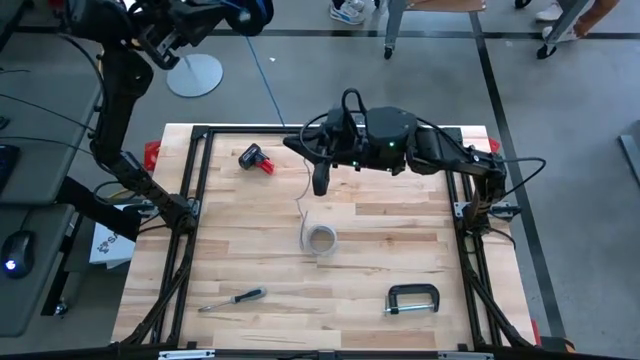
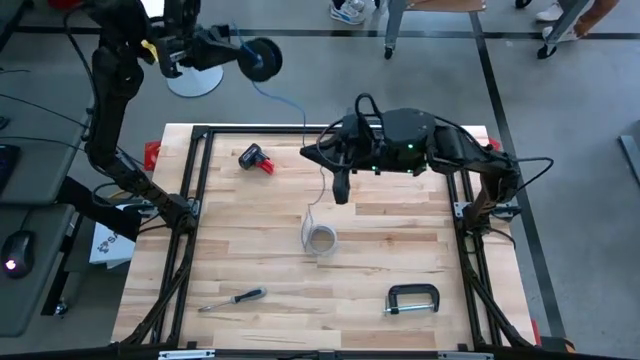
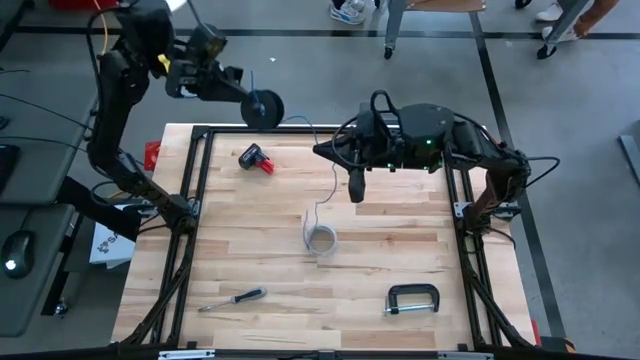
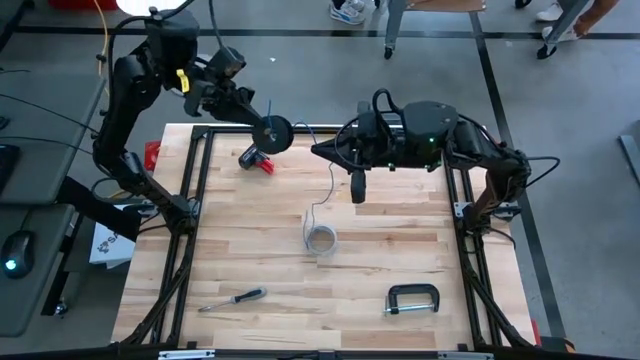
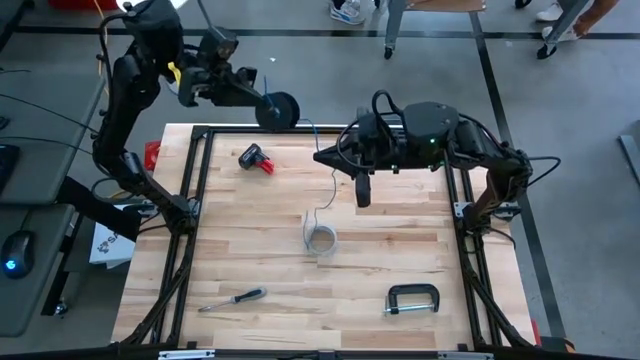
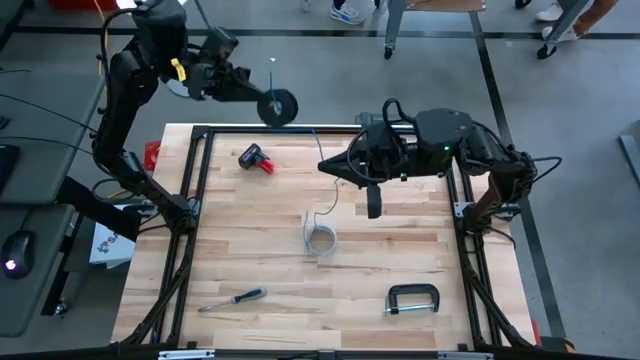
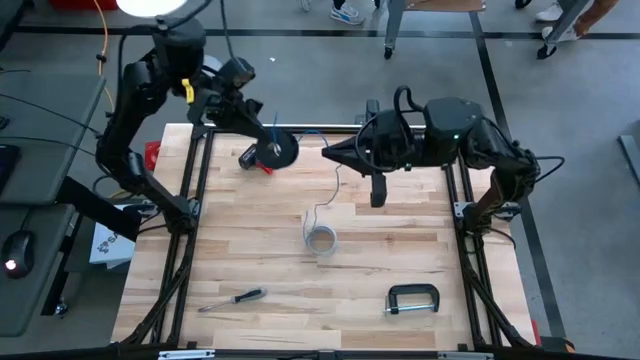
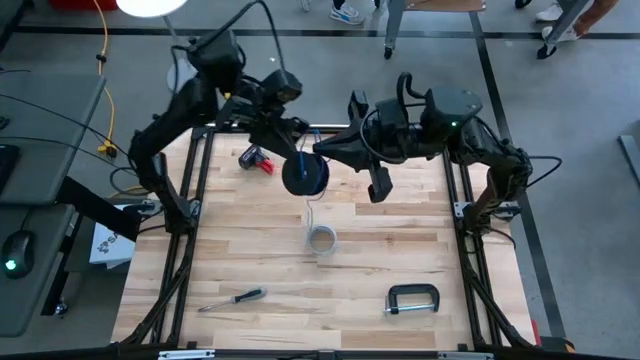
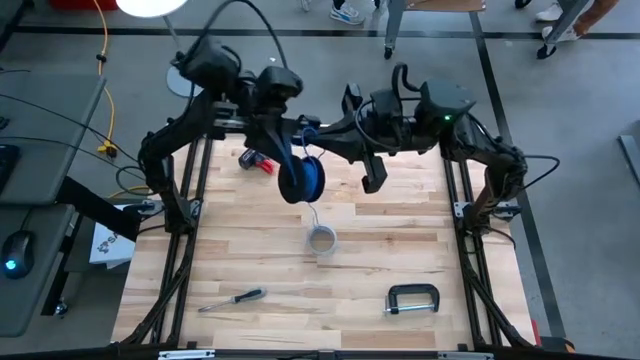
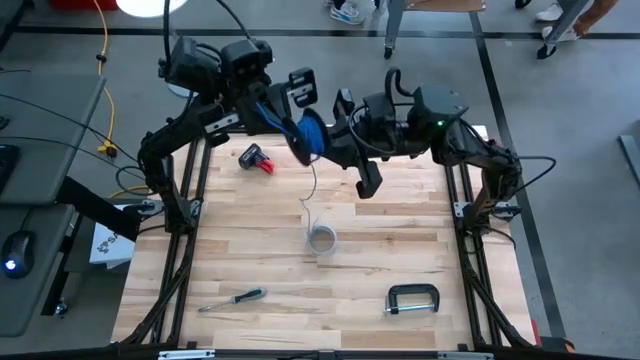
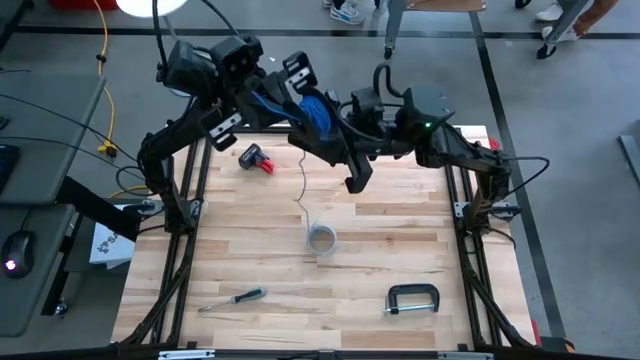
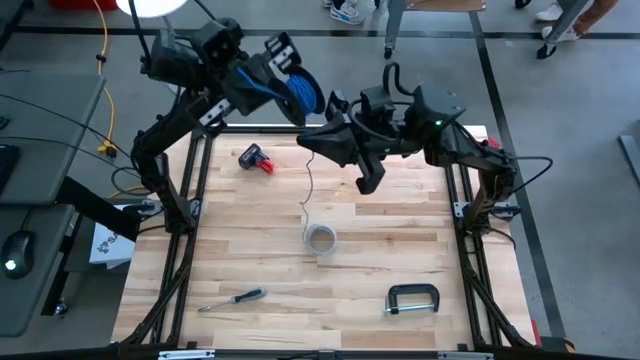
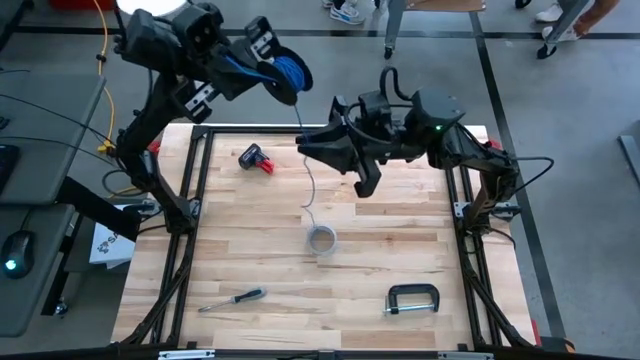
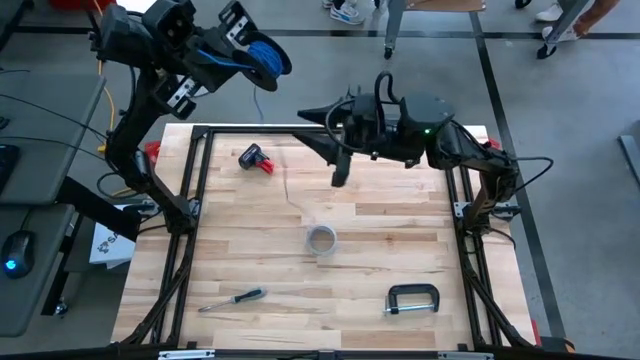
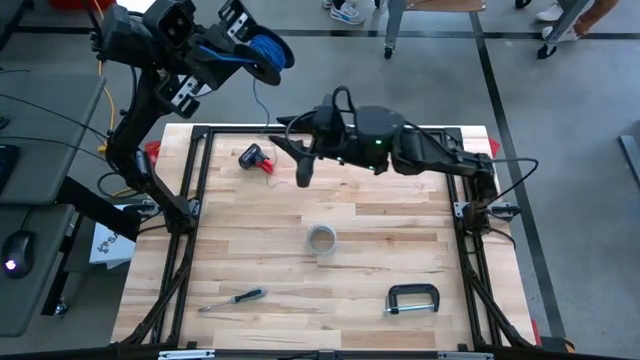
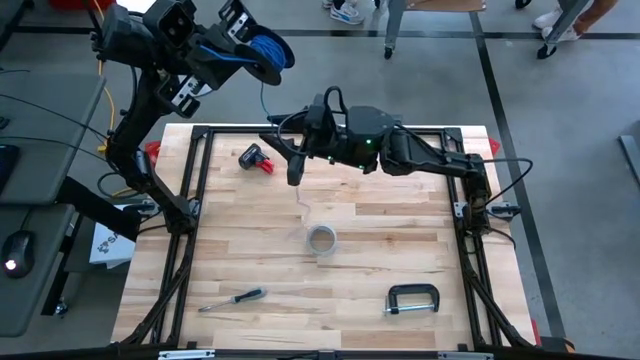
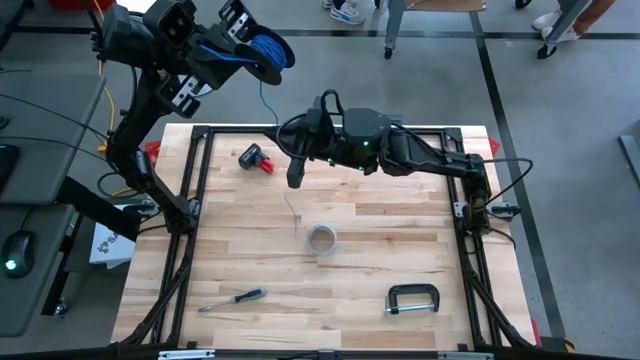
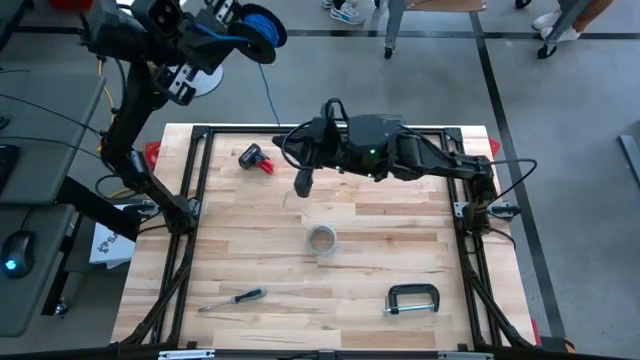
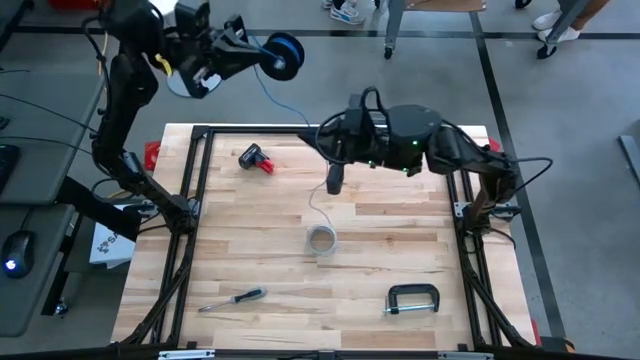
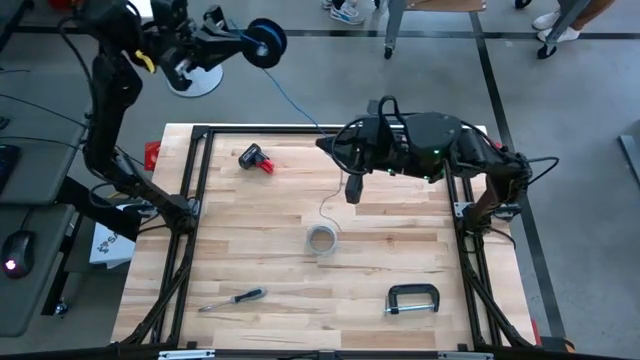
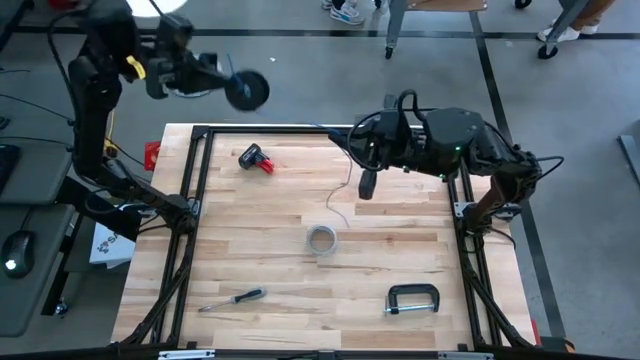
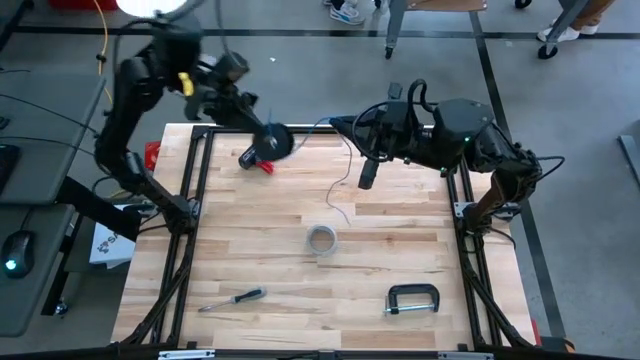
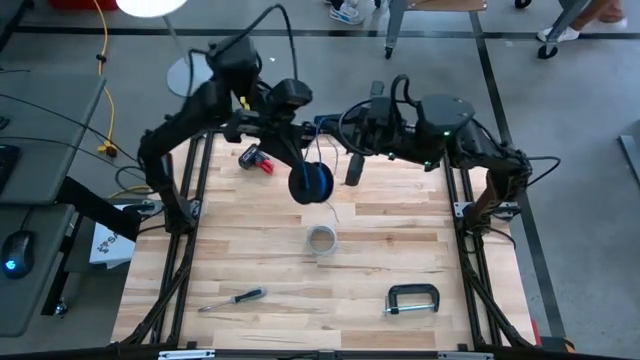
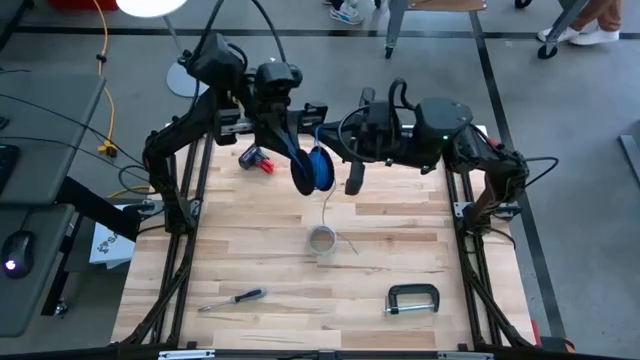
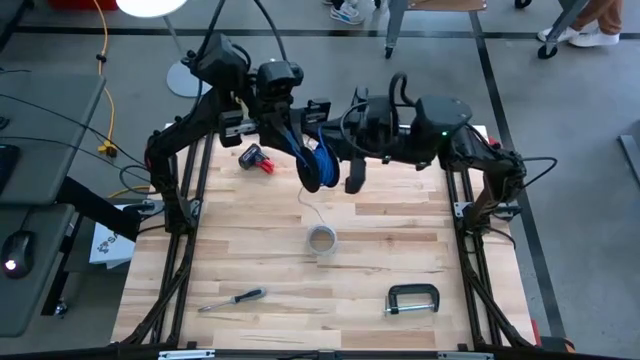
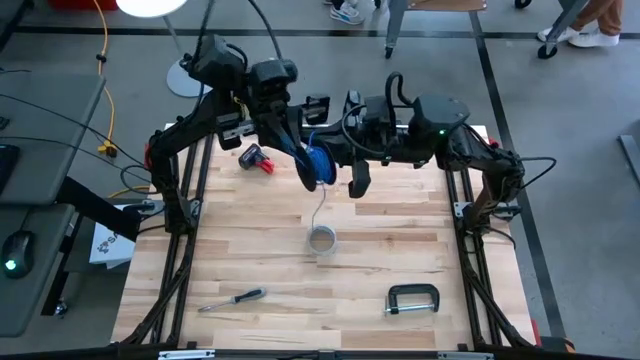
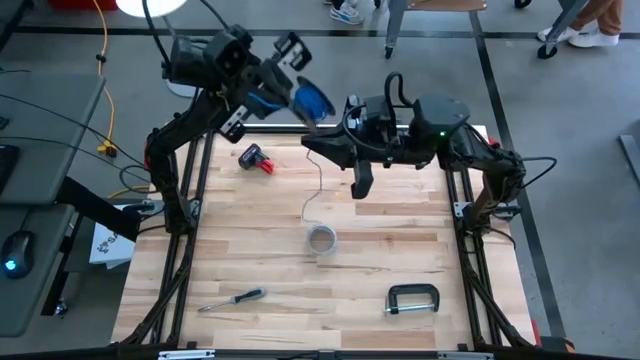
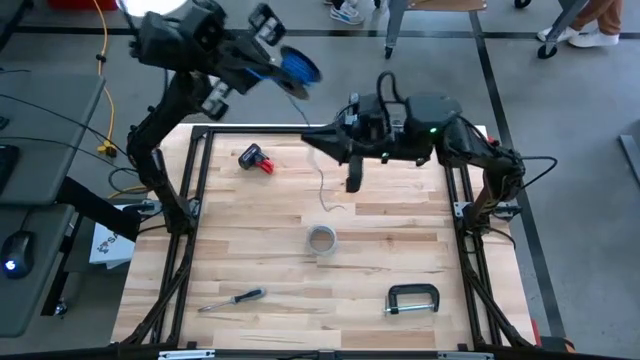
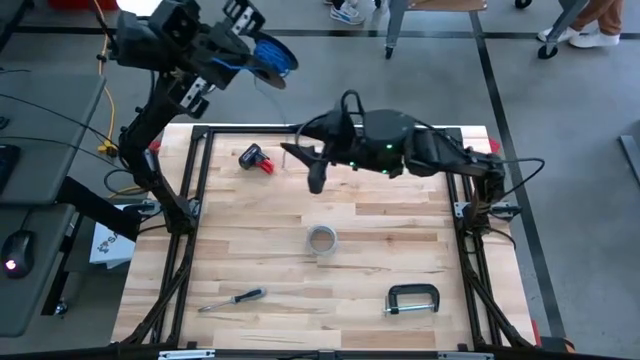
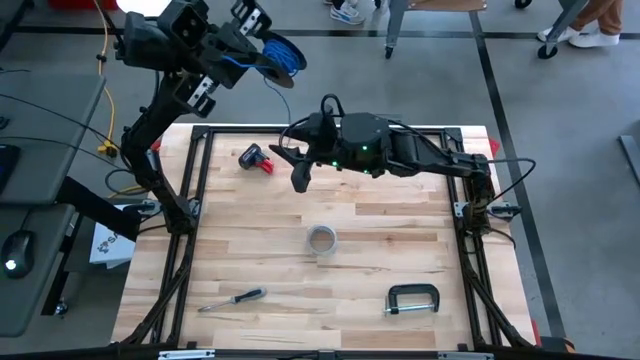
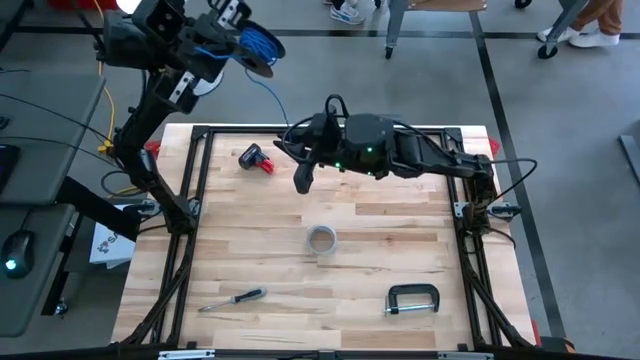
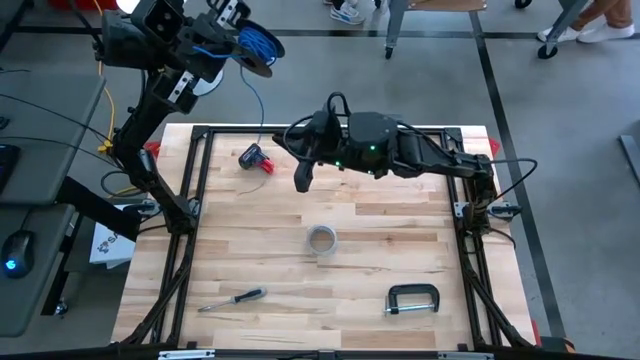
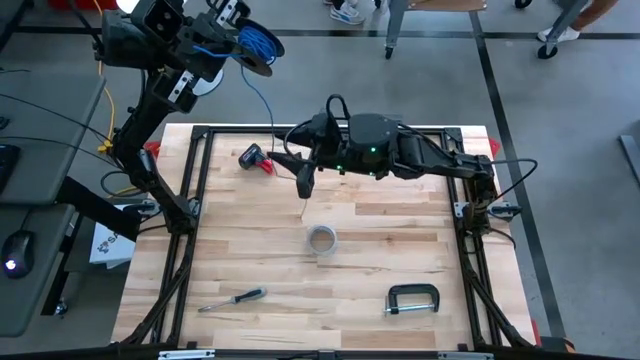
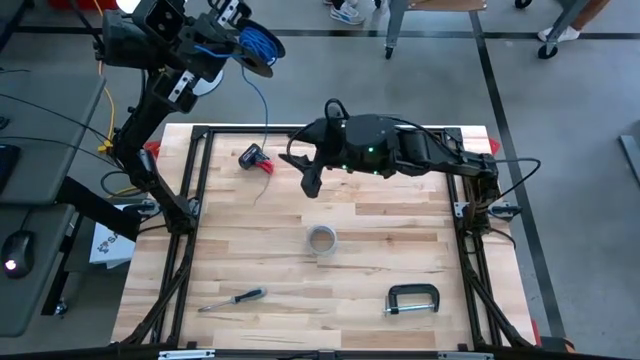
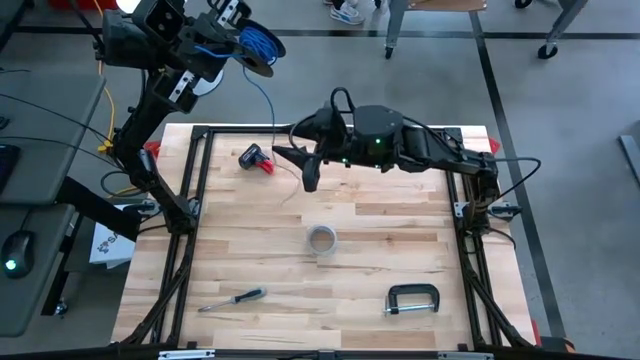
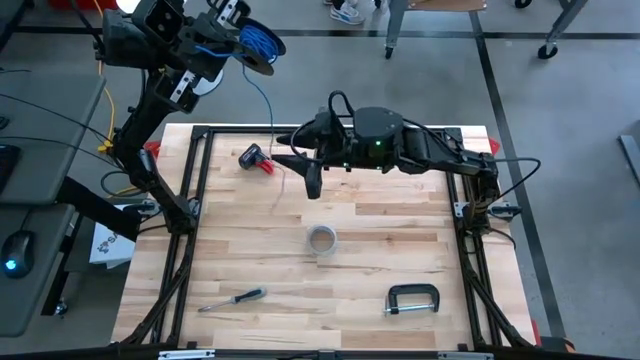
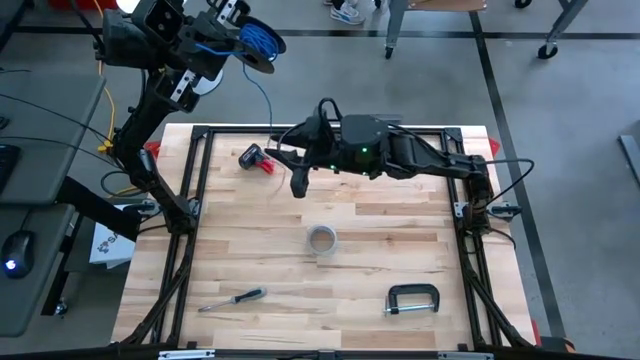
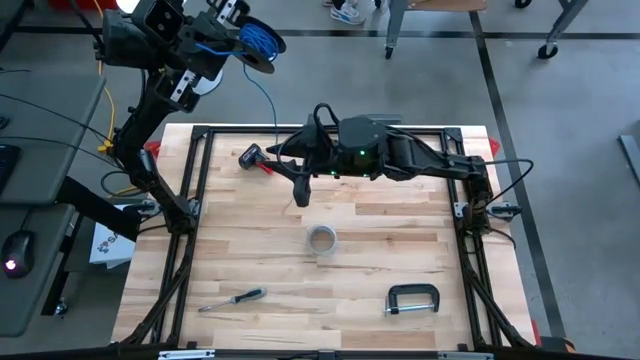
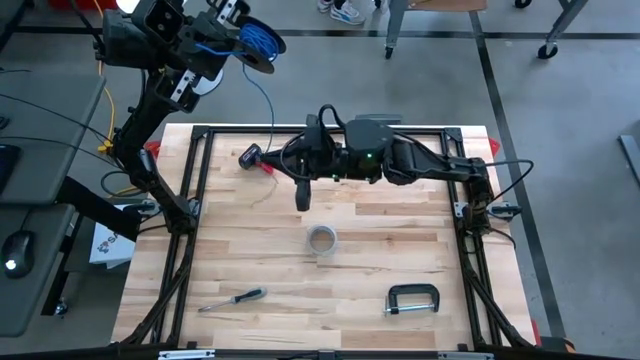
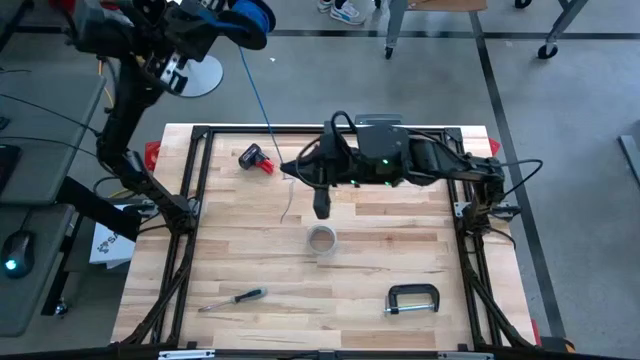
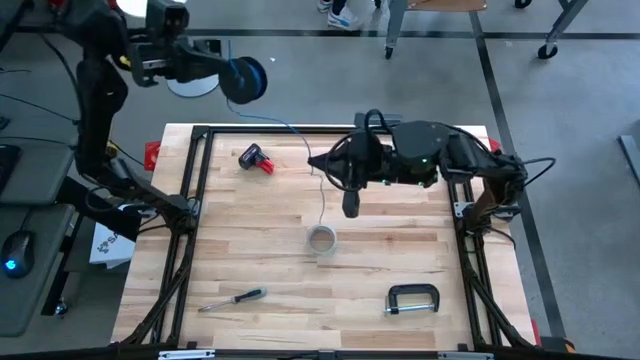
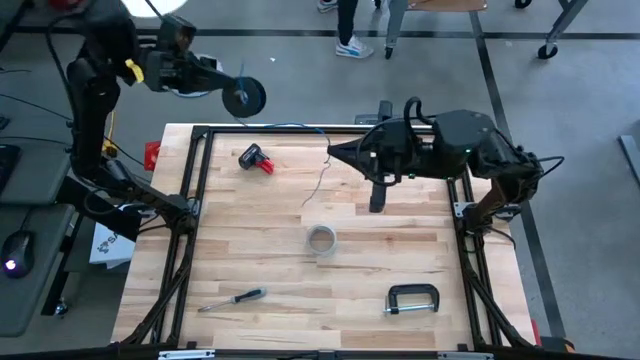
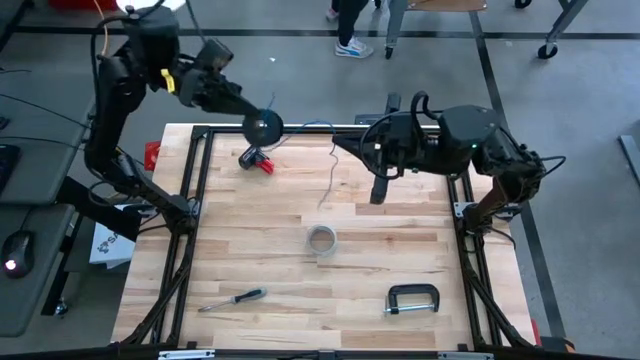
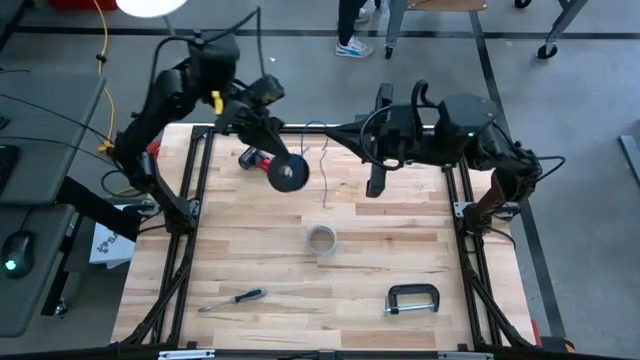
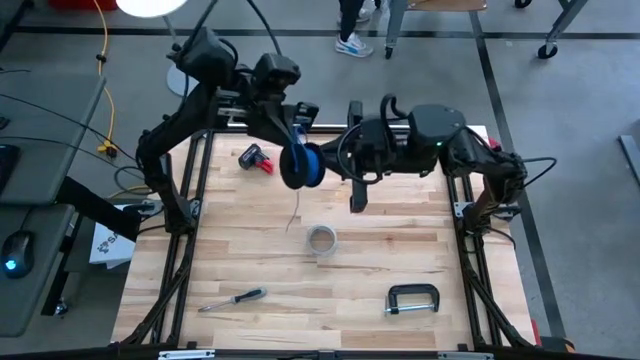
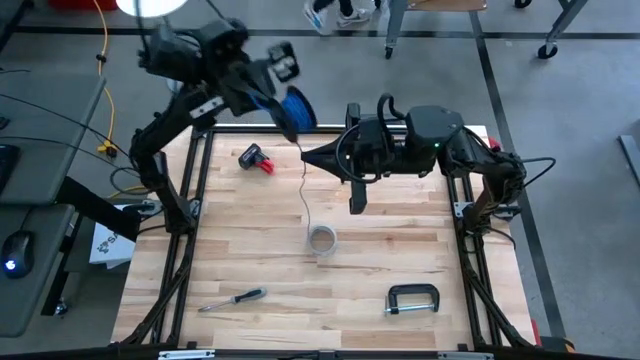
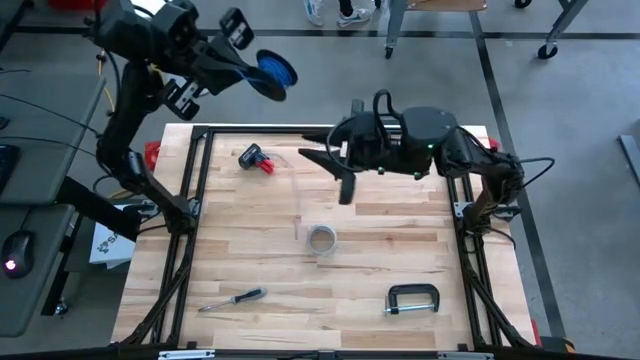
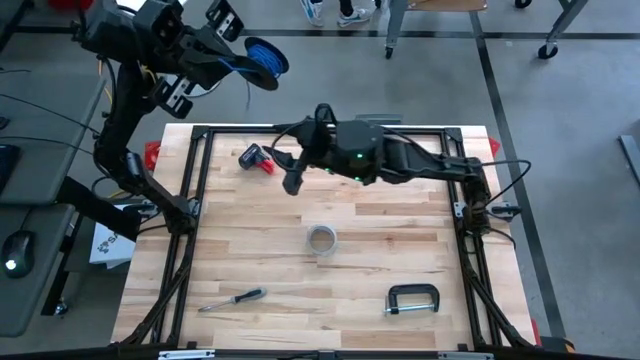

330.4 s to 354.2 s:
Task: Coil cords
Coil the blue wire on the spool
